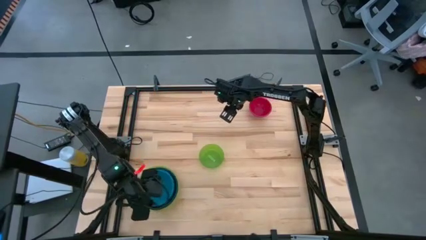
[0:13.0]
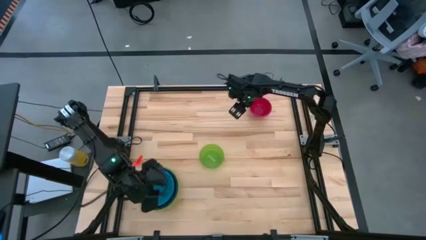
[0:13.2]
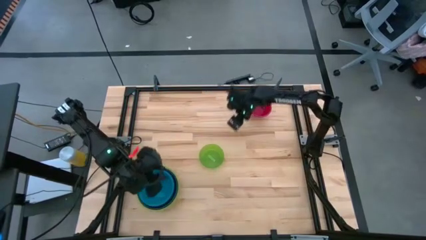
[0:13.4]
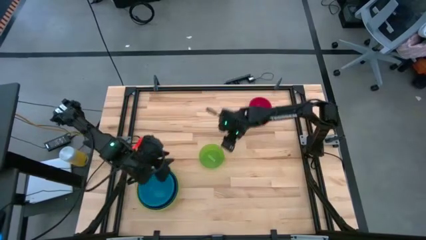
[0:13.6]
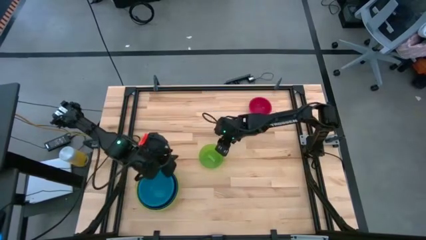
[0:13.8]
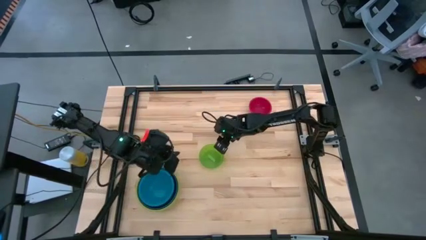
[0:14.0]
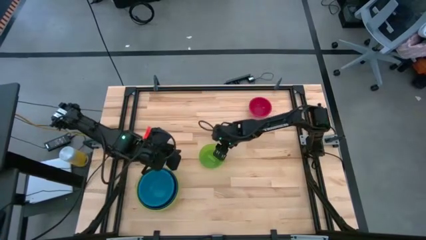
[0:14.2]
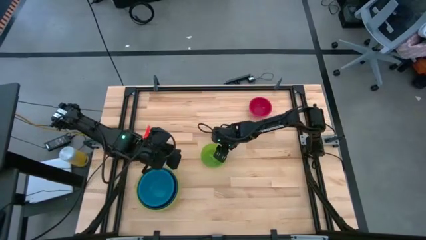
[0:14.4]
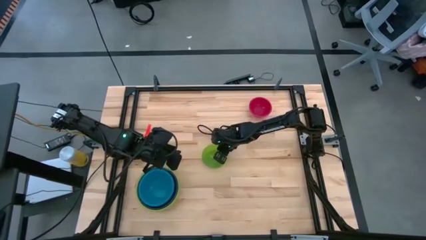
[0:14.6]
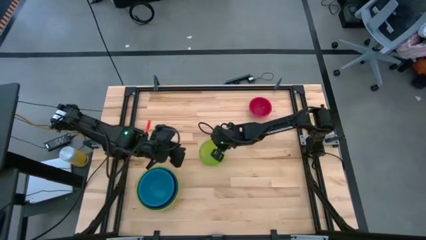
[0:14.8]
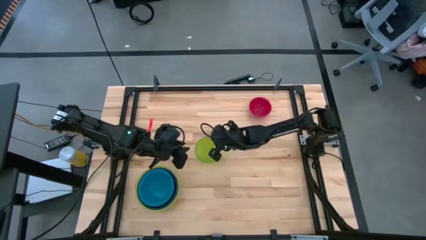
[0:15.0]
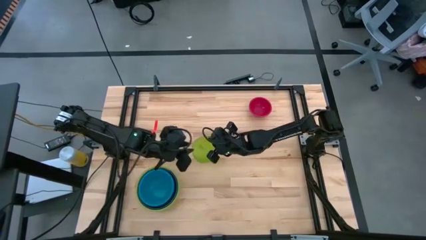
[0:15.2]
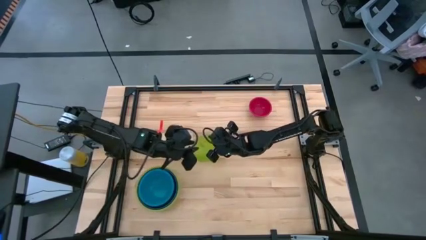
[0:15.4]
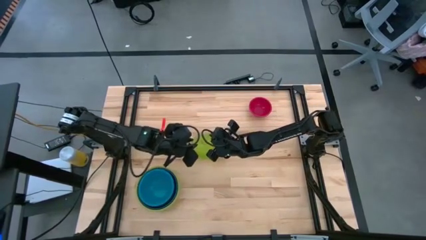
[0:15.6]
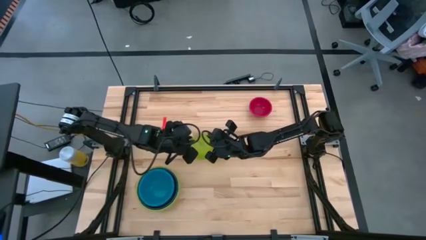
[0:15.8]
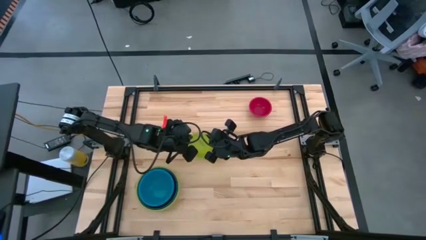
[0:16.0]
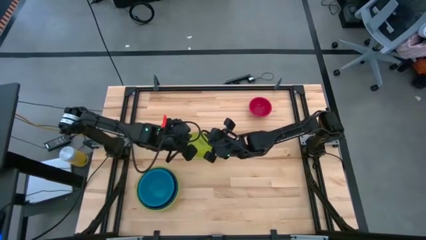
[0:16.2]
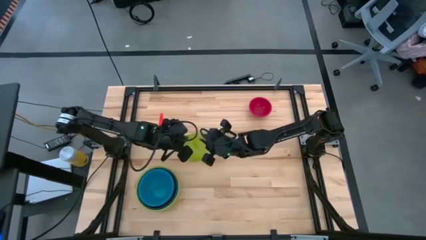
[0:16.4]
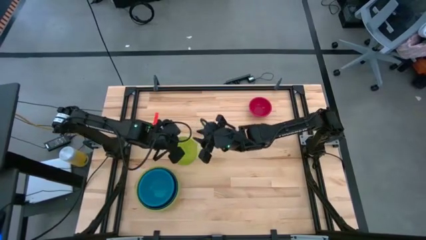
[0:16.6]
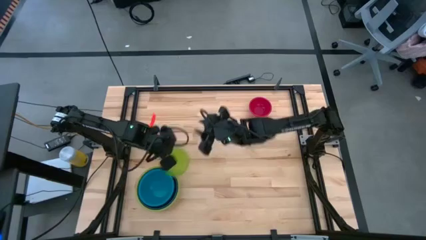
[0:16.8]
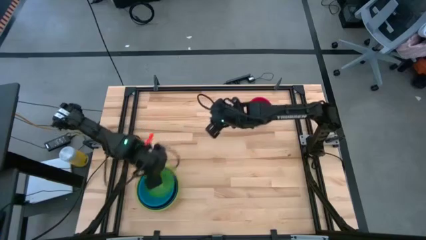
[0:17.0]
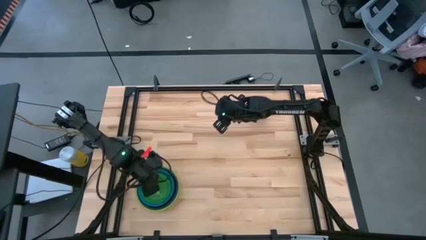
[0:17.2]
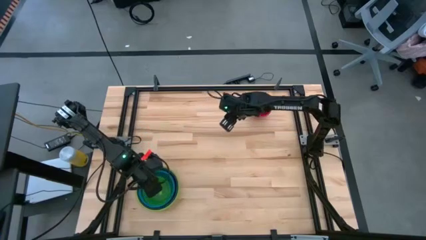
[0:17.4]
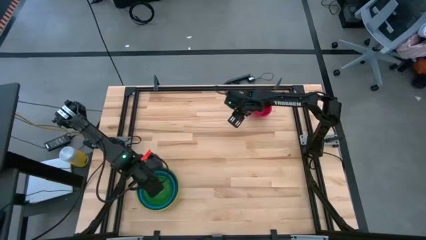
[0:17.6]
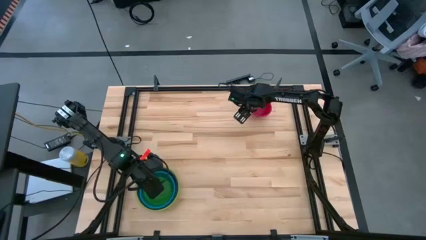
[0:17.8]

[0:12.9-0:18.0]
Stack the green bowl on top of the blue bowl

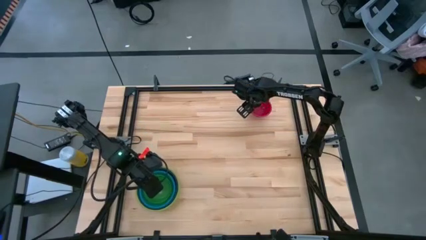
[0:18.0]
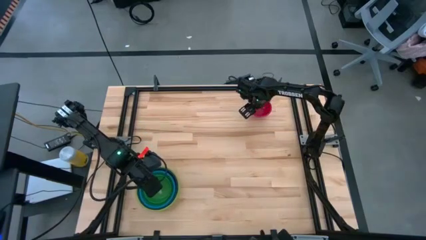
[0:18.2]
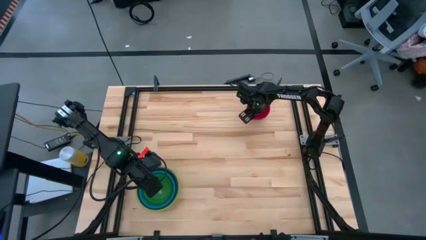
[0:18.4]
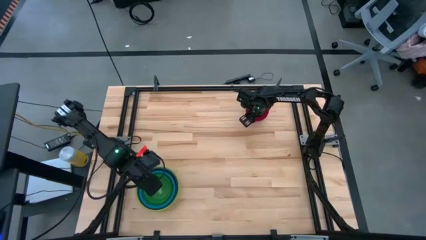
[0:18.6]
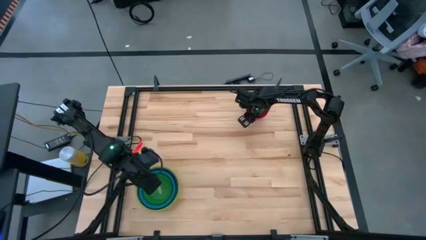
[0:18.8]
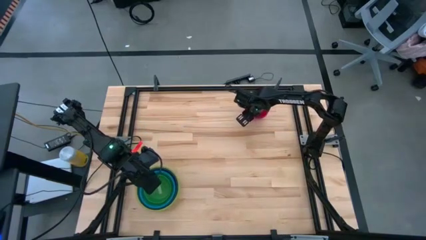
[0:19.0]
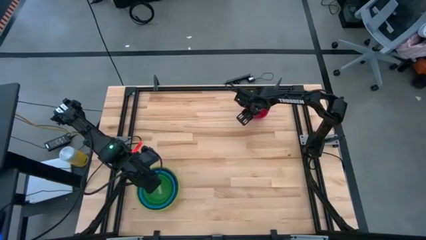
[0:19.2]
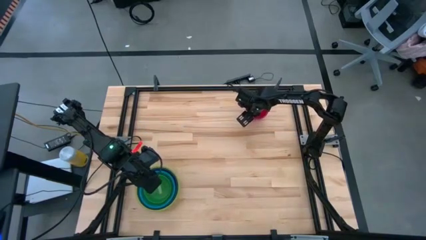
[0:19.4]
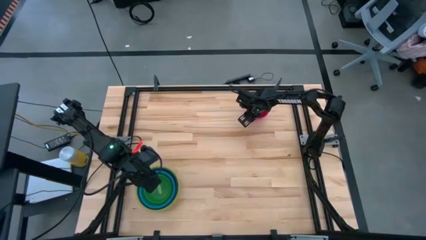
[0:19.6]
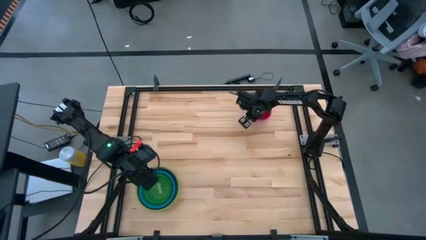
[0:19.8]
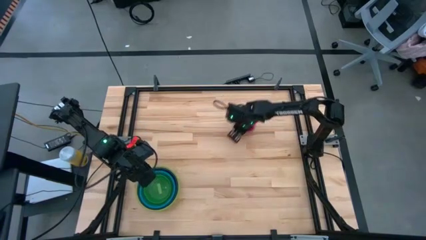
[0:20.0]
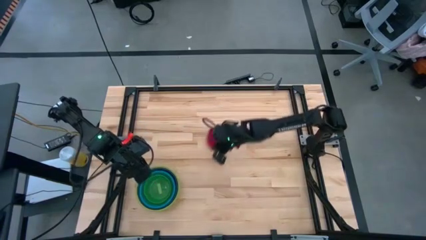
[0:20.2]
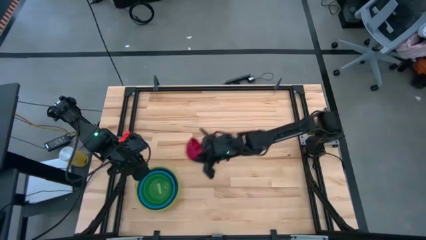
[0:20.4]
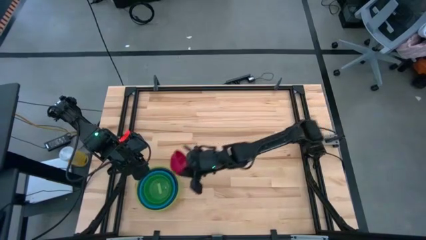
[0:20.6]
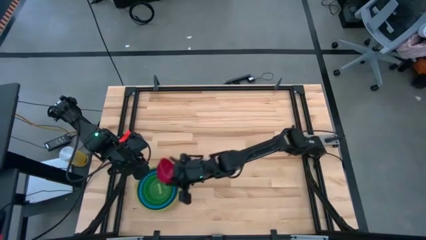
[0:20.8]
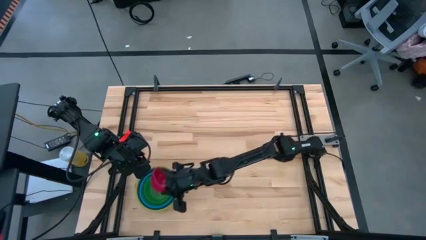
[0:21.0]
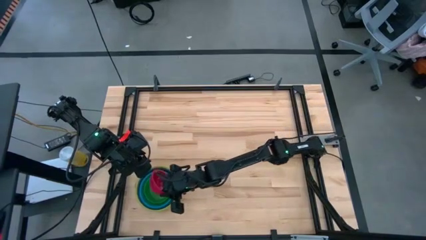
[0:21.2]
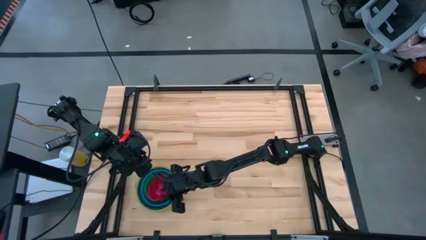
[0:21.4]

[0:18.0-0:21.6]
Stack the red bowl on top of the green bowl

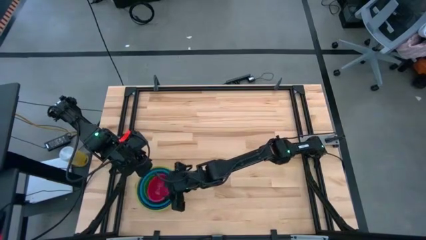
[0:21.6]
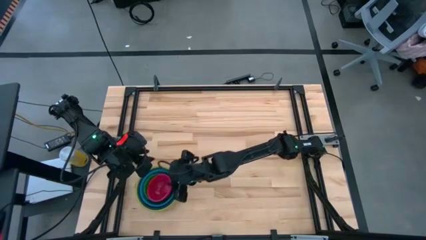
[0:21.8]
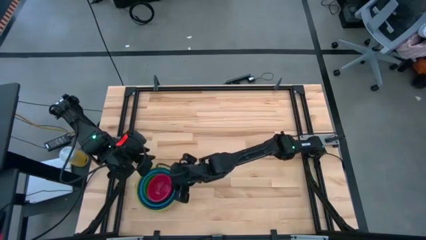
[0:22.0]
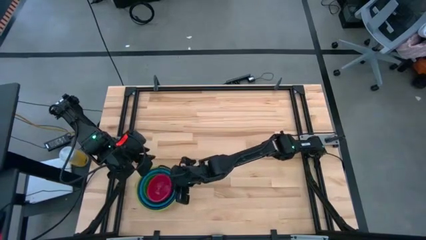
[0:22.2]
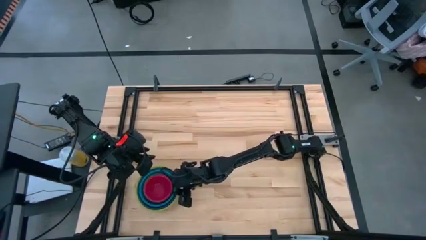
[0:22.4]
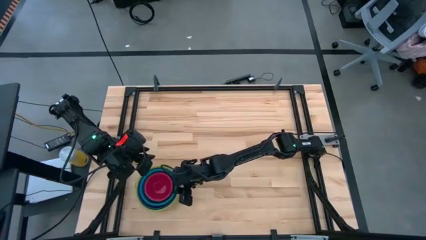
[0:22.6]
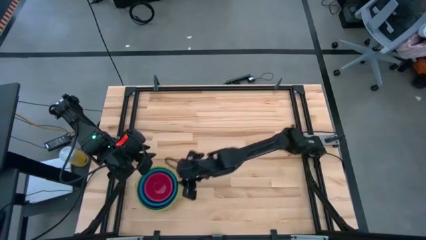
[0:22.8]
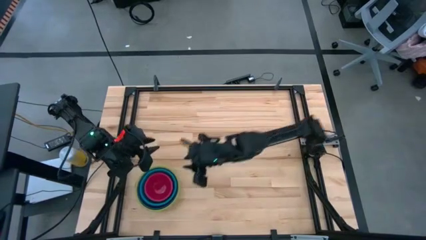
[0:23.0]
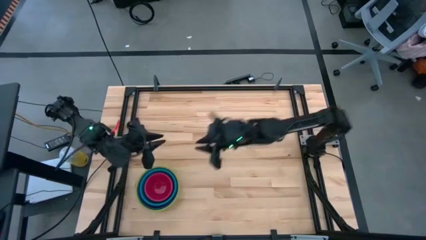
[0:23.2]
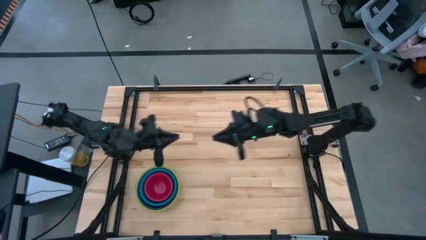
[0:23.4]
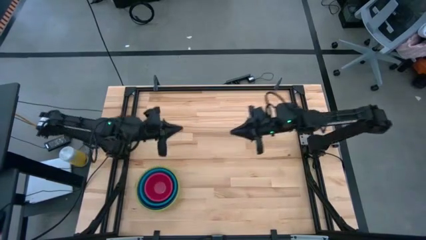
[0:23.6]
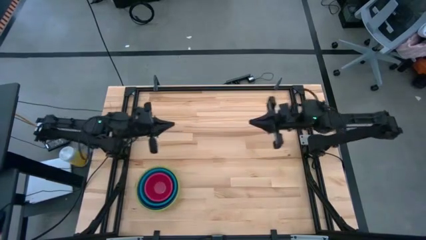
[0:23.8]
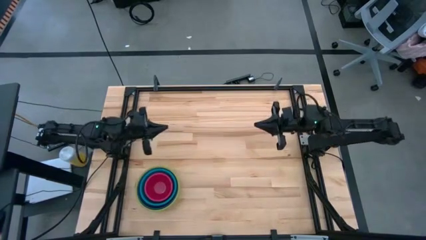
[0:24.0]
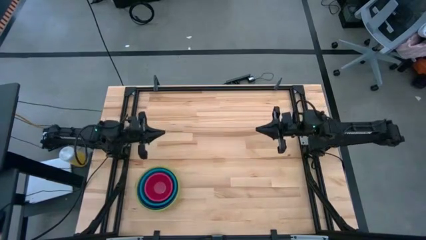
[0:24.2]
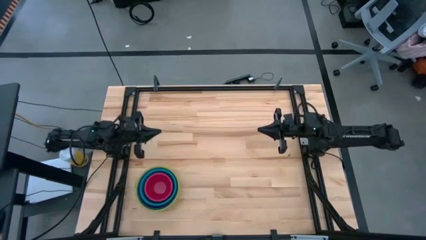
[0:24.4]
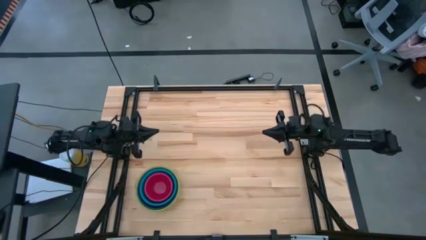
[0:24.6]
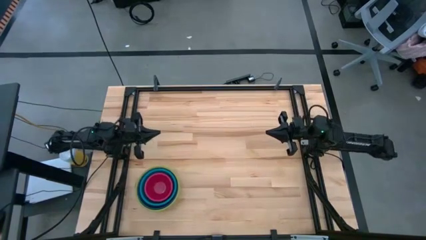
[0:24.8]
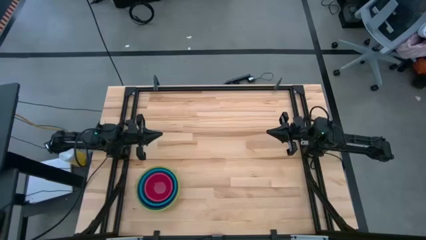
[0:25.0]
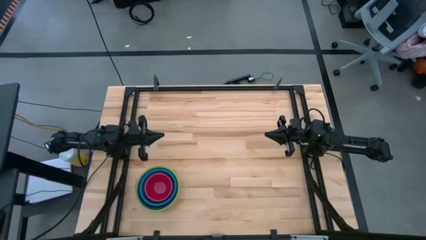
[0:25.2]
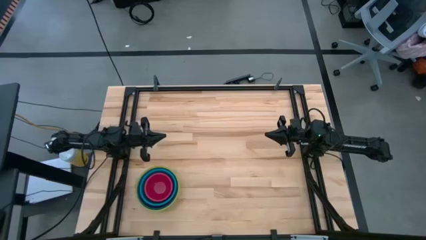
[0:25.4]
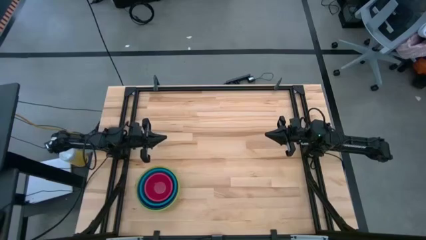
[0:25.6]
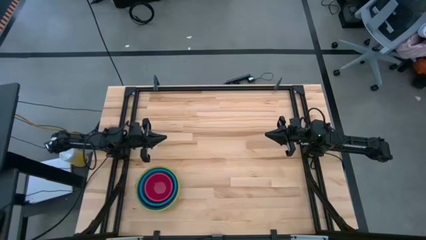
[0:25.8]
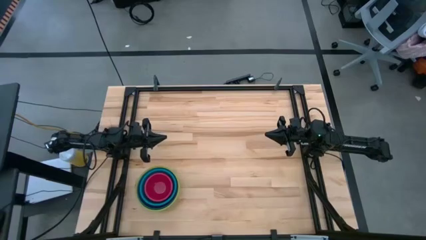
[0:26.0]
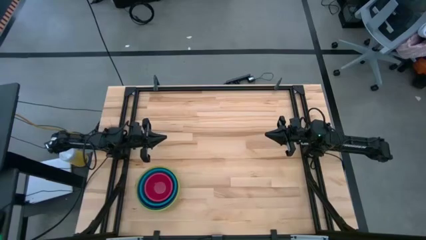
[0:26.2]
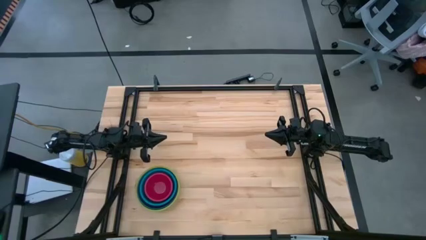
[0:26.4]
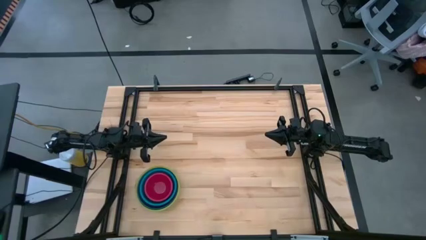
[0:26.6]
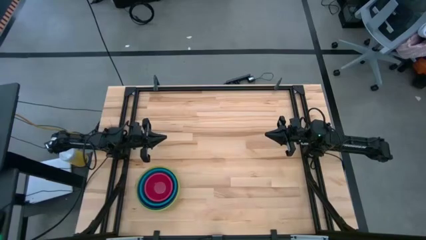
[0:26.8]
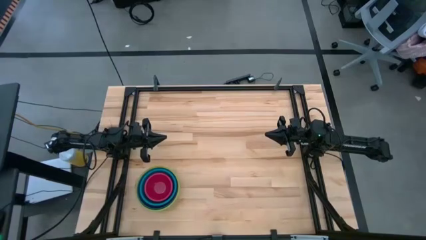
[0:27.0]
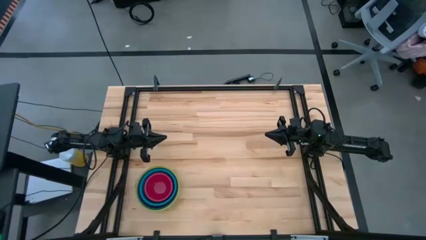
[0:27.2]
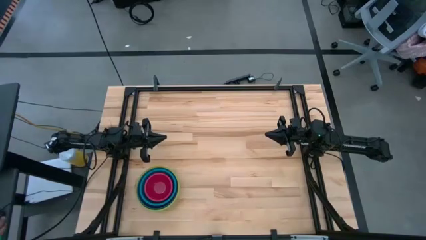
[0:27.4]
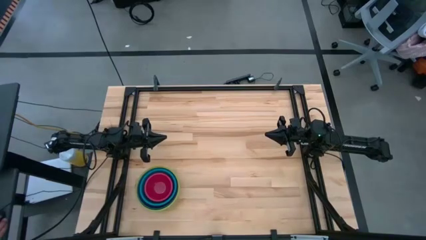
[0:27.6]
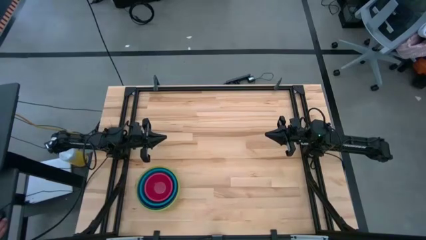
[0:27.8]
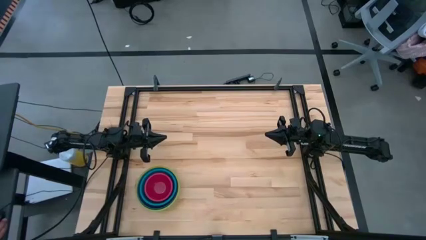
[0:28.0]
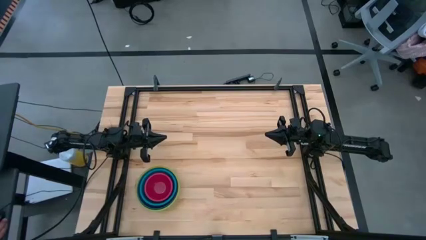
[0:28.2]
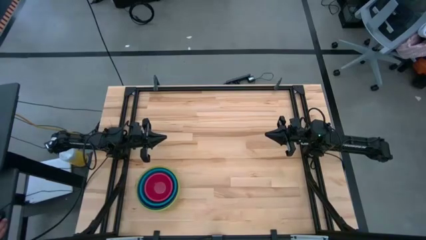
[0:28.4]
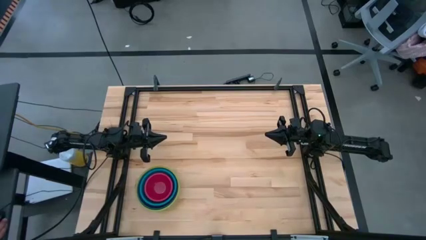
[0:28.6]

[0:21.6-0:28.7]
Return to Home Position
